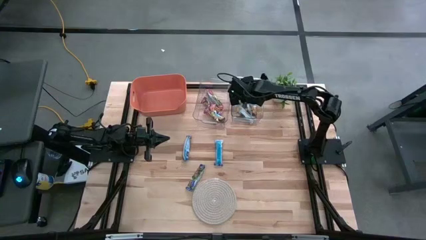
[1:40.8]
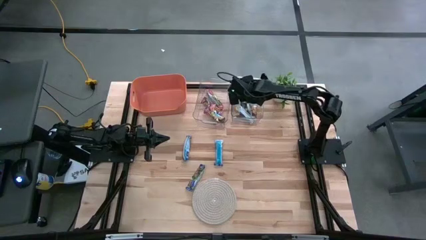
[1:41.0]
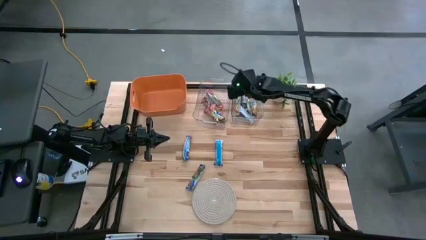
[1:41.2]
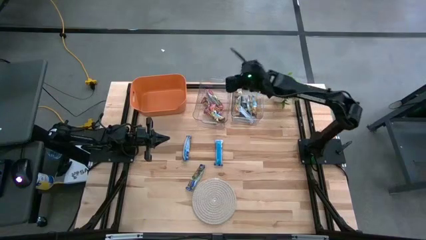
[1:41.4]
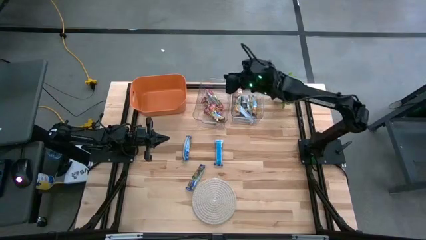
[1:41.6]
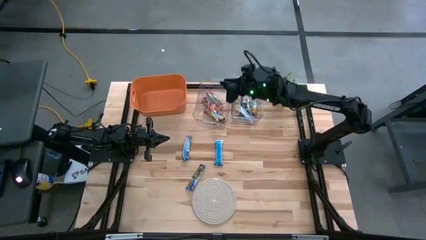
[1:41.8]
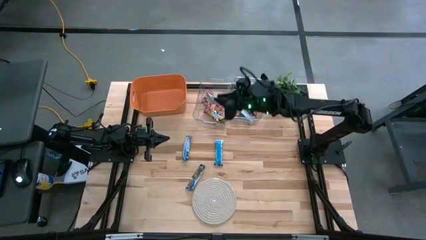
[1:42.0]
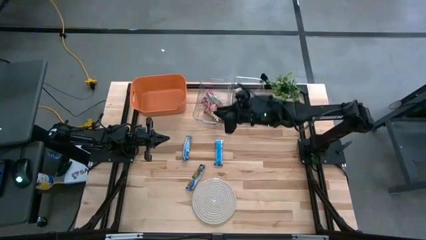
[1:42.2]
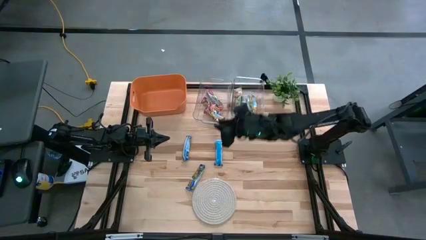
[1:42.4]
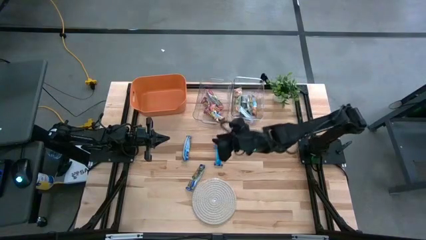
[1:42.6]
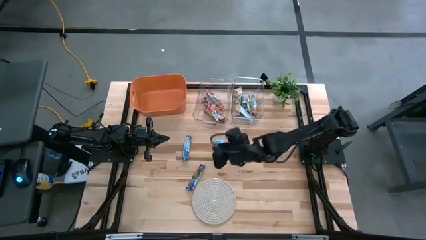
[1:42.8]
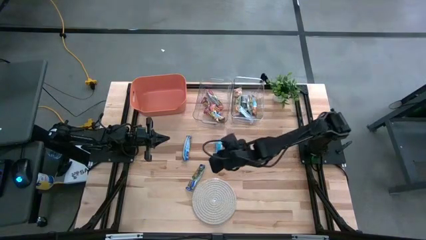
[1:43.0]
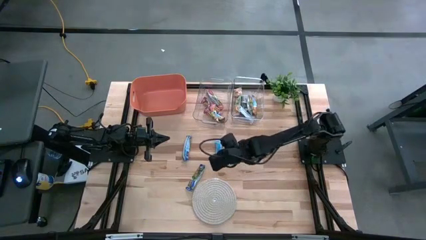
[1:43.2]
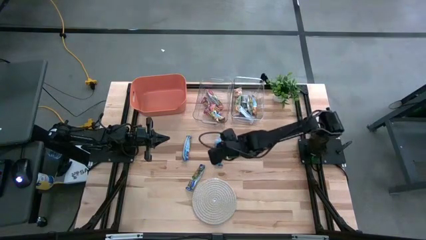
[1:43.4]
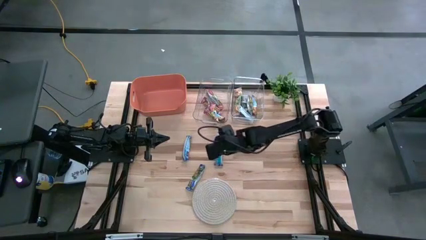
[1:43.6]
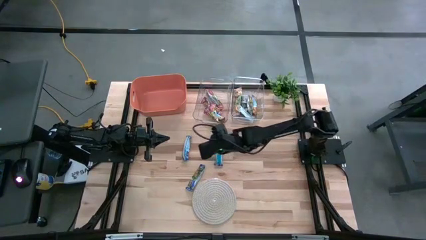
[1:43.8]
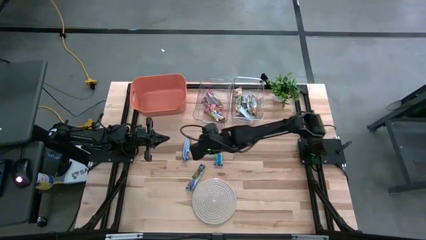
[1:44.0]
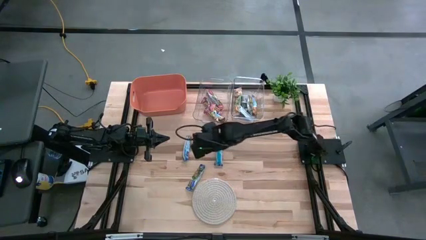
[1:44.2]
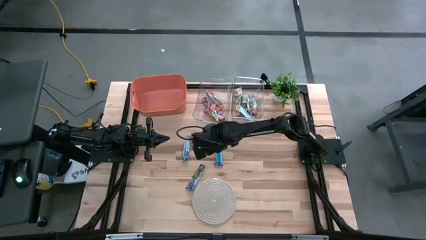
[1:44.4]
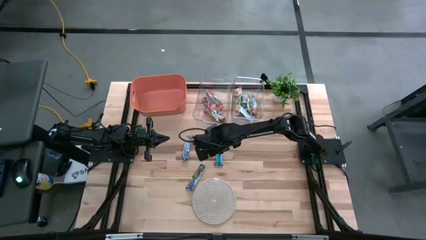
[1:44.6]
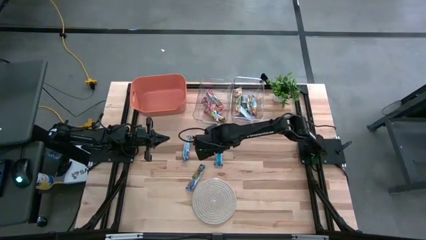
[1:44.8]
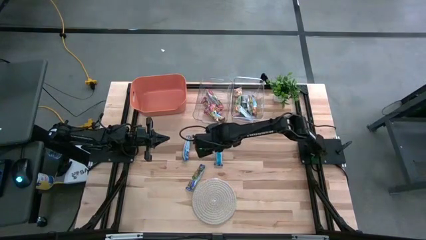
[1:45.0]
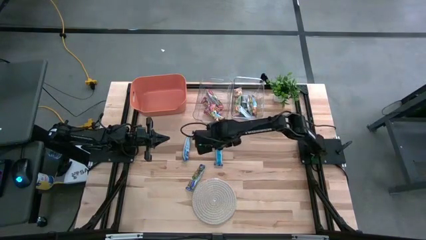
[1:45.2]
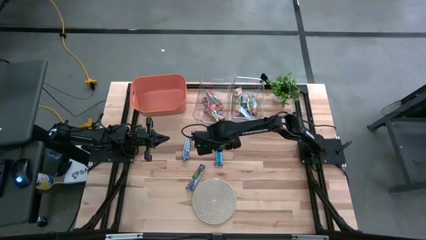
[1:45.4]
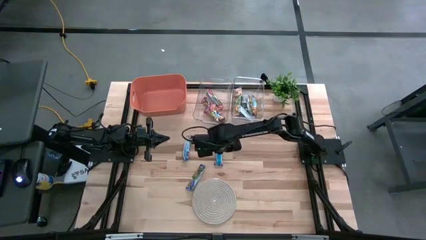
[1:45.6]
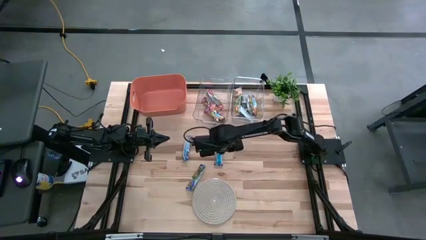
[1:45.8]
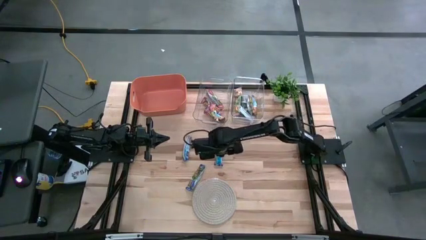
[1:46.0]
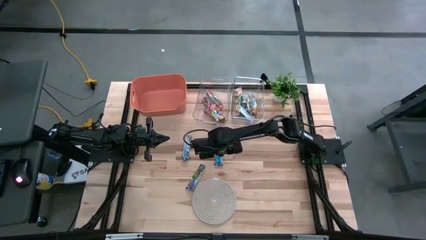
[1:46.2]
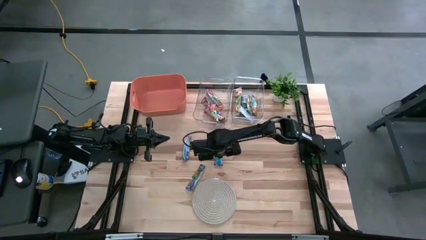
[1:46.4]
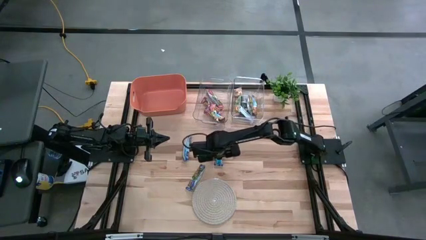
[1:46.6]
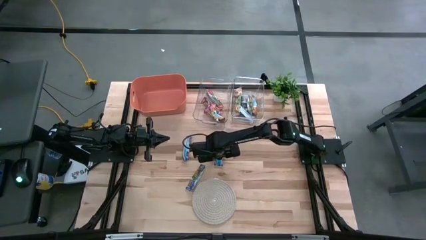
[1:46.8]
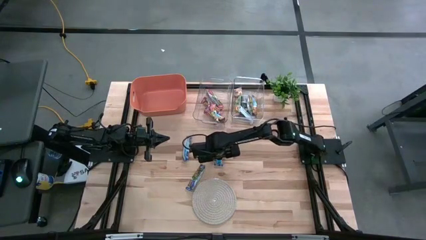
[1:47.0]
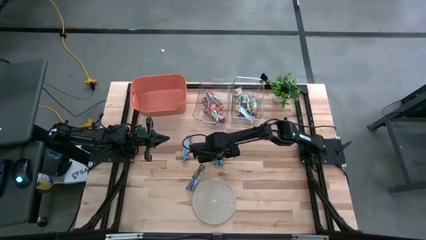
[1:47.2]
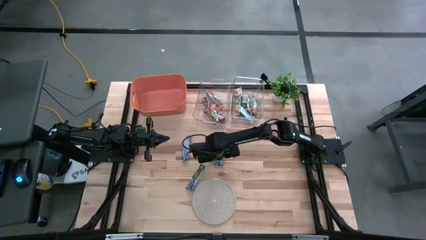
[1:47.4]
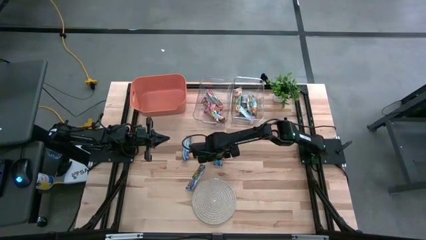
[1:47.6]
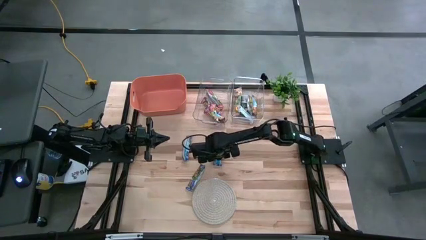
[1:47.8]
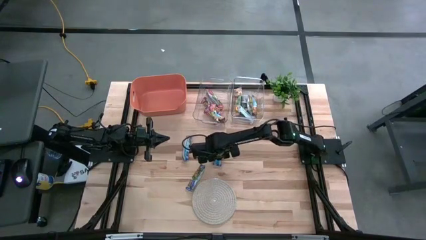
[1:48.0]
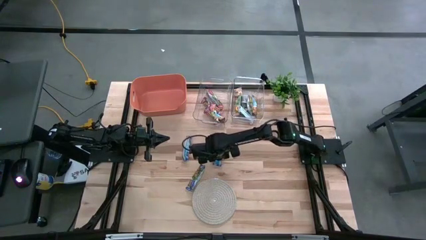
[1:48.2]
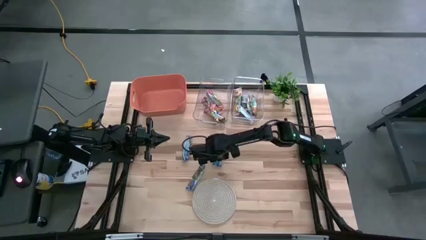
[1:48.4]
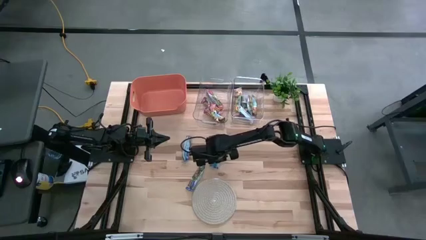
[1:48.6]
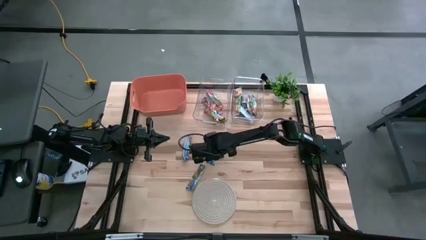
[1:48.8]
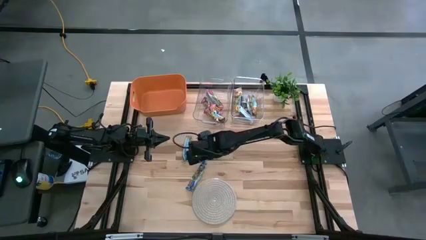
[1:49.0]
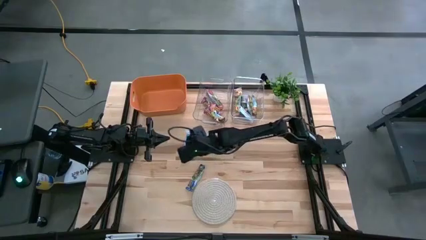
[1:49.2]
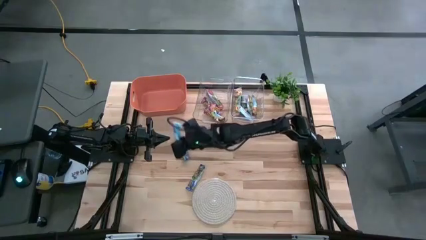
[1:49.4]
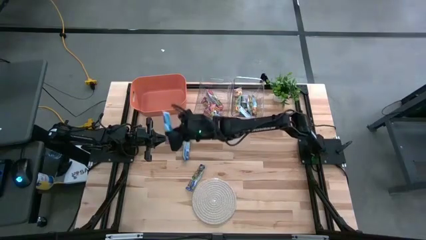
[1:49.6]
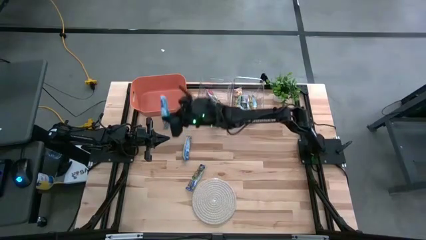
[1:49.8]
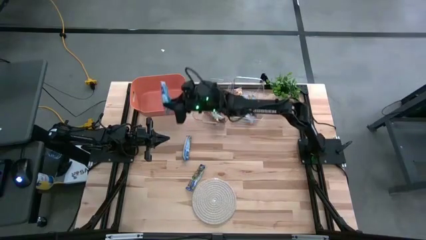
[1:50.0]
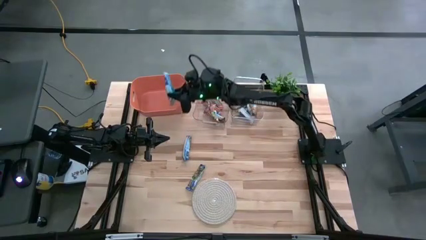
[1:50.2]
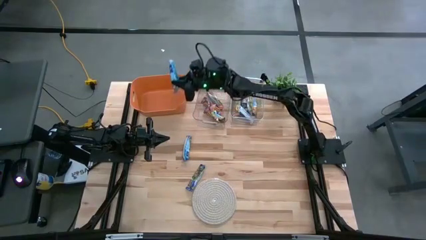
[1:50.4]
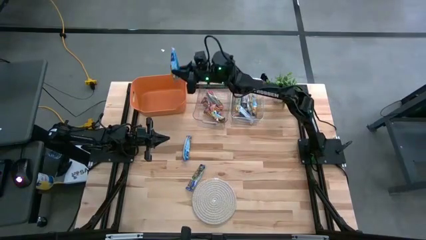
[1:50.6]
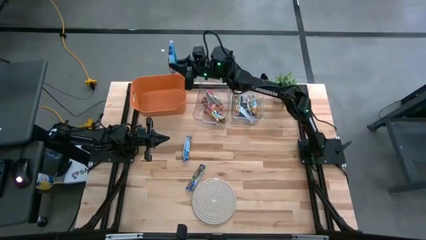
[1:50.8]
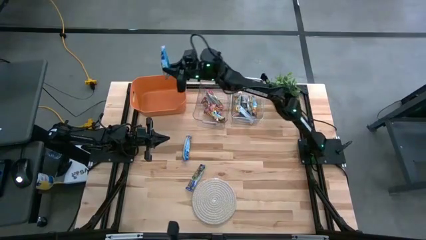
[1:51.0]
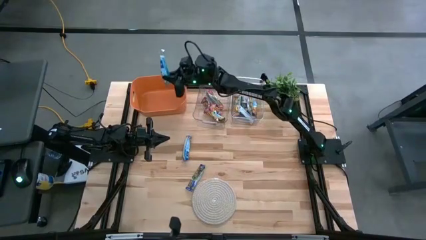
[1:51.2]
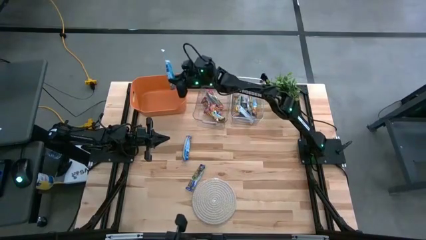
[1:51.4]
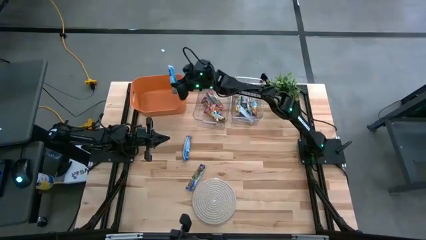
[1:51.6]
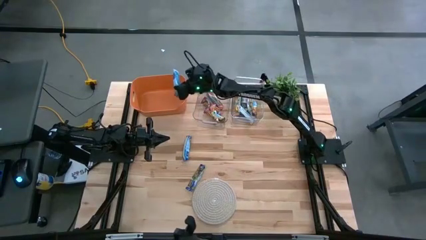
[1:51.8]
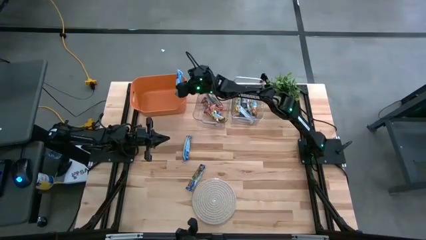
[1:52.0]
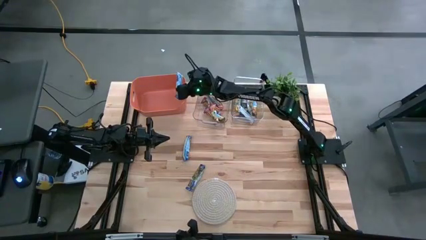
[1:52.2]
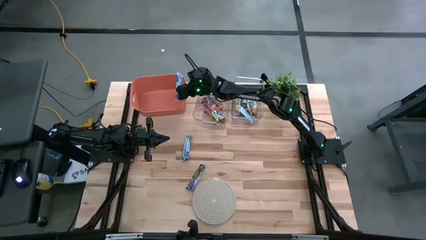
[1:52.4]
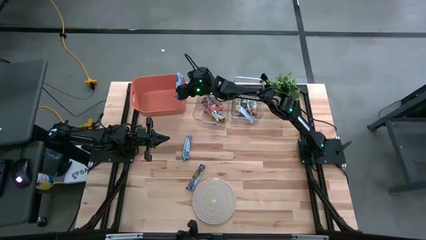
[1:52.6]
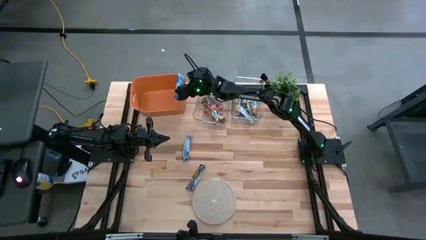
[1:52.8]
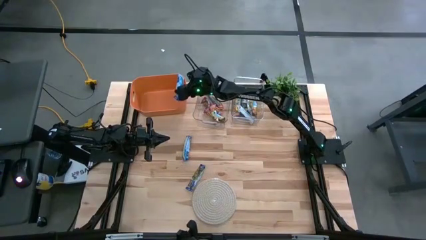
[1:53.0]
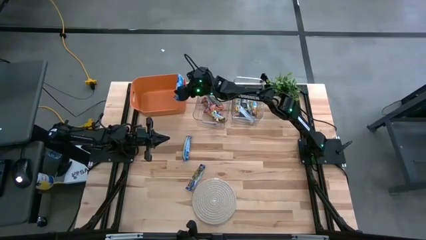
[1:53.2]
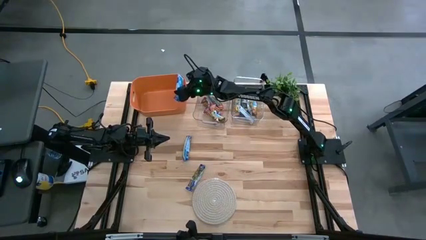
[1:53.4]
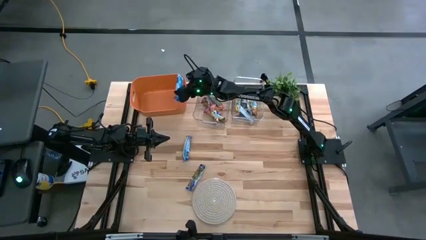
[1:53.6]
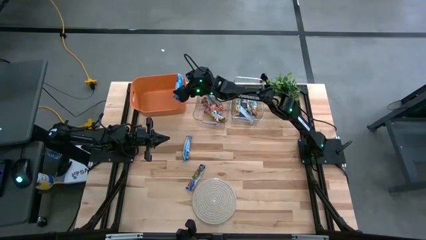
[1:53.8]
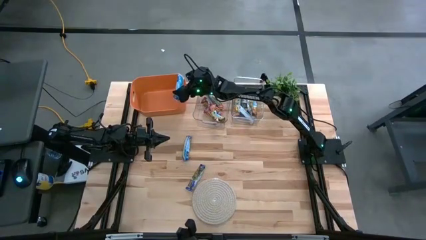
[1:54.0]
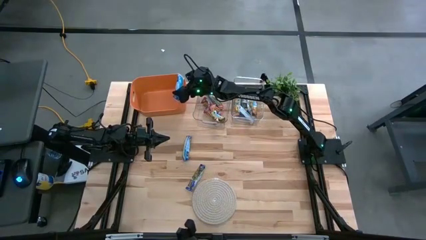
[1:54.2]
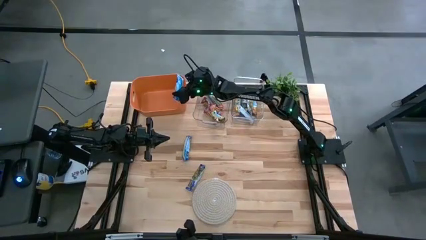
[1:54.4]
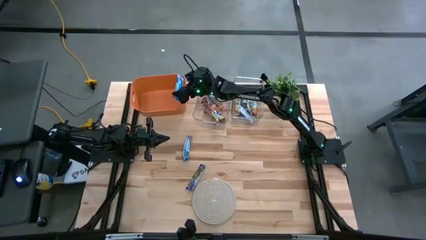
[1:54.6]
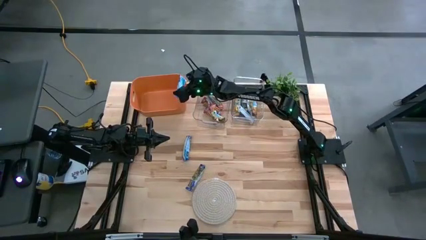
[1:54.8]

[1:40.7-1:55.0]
Task: Pick and place Granola Bars by type
Put the blue granola bar into the orange bin
